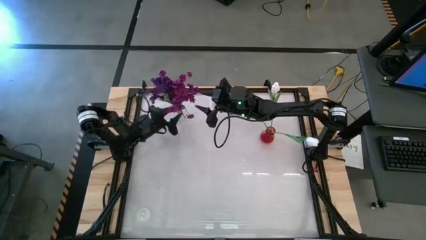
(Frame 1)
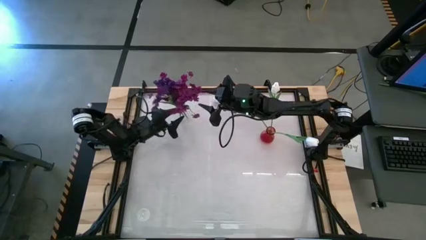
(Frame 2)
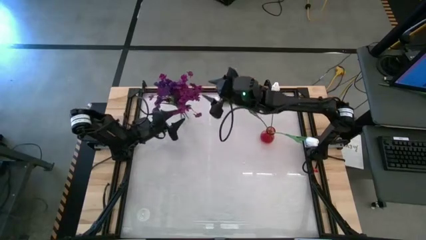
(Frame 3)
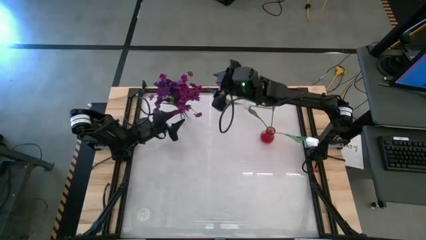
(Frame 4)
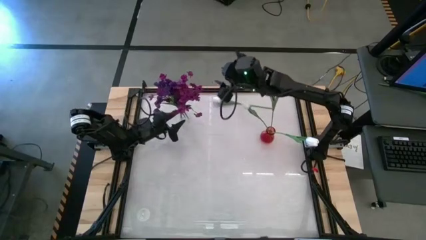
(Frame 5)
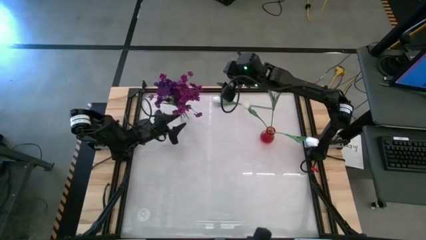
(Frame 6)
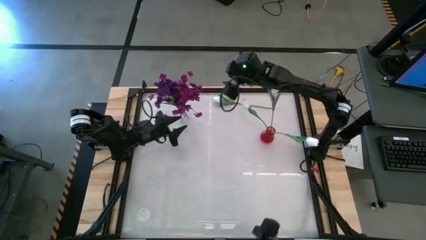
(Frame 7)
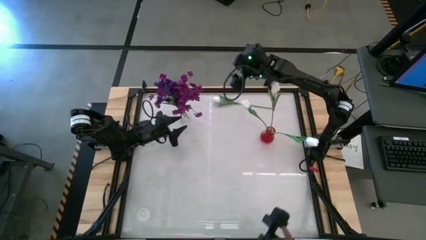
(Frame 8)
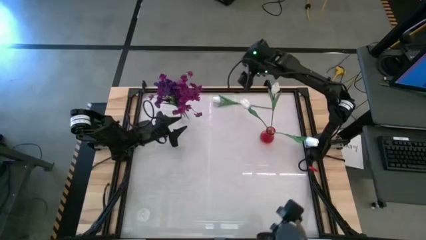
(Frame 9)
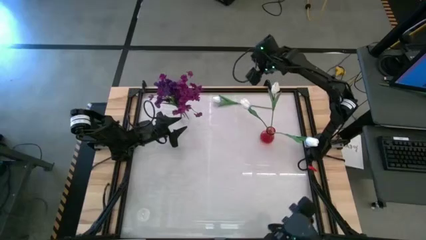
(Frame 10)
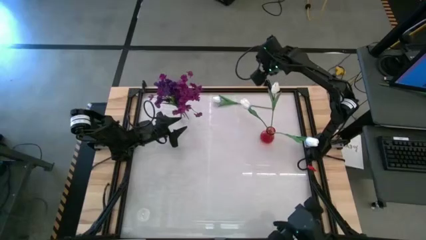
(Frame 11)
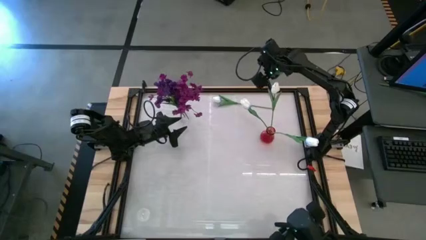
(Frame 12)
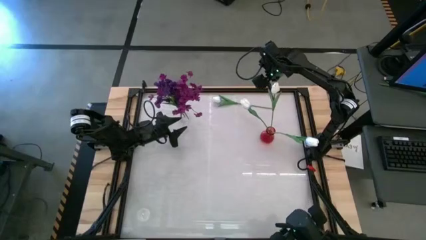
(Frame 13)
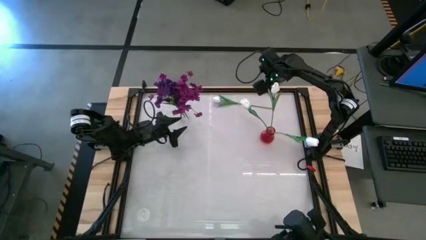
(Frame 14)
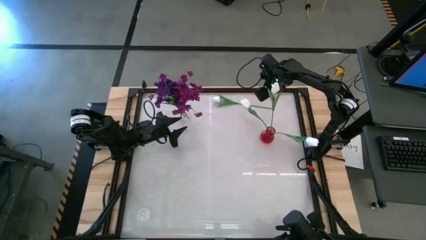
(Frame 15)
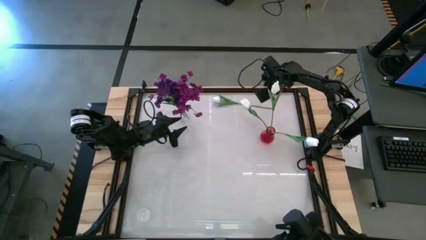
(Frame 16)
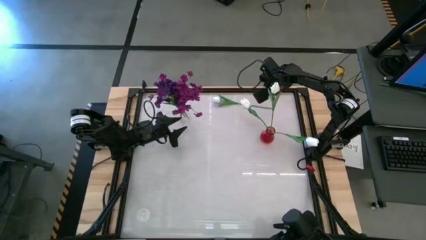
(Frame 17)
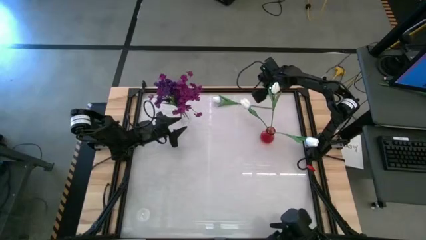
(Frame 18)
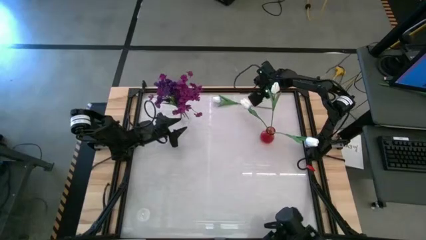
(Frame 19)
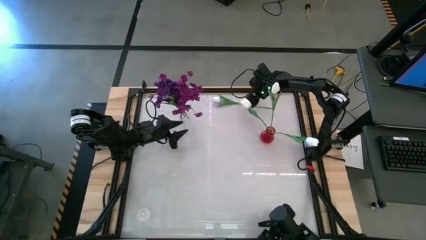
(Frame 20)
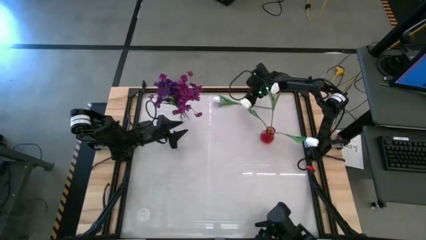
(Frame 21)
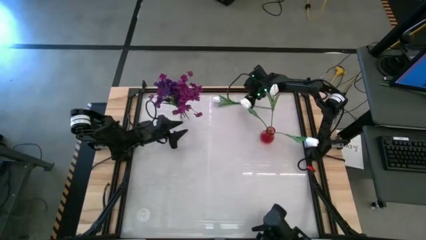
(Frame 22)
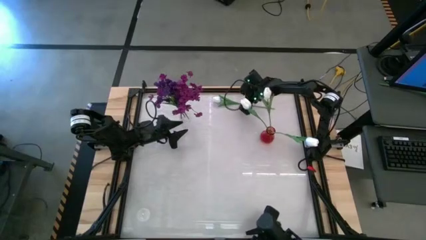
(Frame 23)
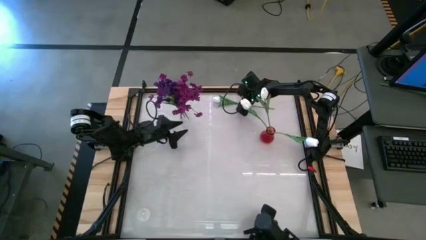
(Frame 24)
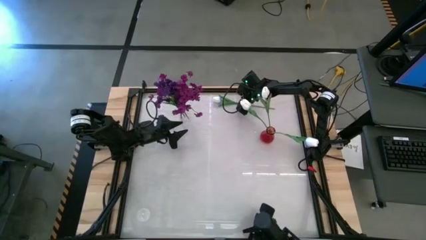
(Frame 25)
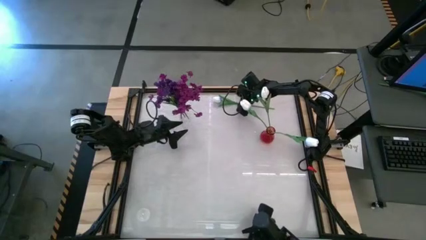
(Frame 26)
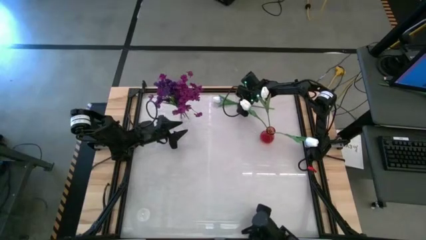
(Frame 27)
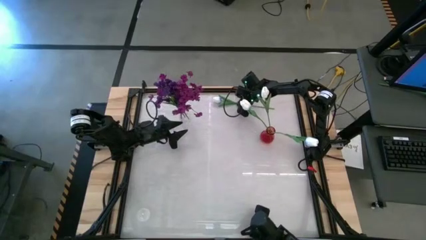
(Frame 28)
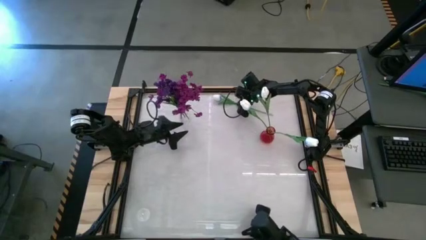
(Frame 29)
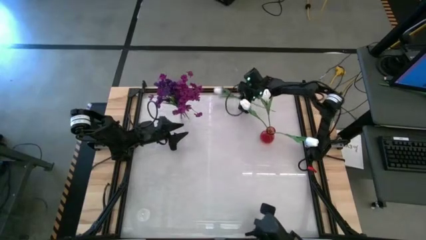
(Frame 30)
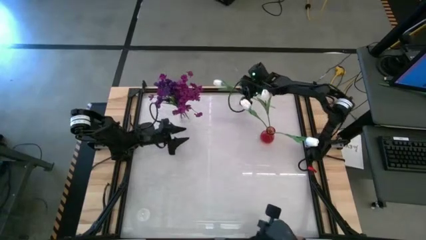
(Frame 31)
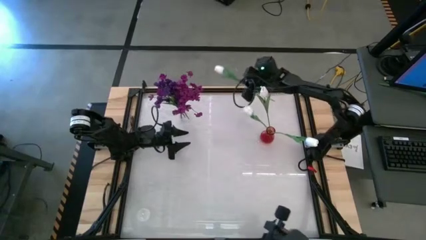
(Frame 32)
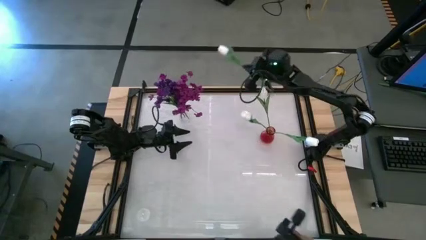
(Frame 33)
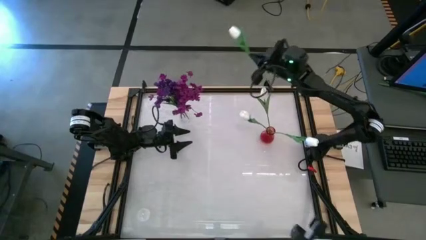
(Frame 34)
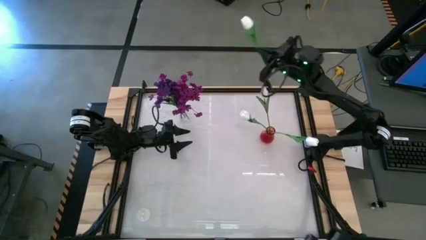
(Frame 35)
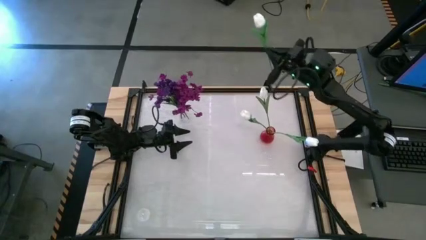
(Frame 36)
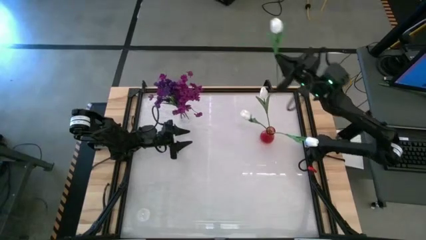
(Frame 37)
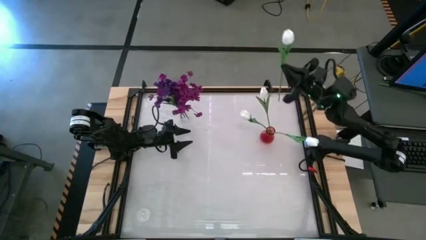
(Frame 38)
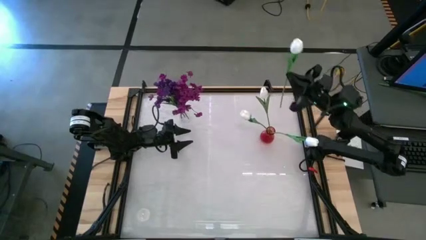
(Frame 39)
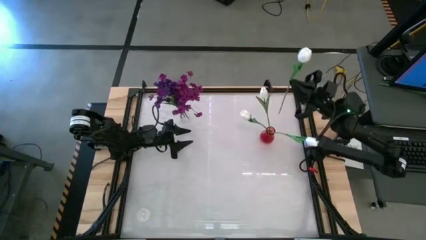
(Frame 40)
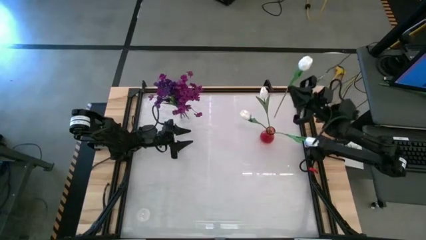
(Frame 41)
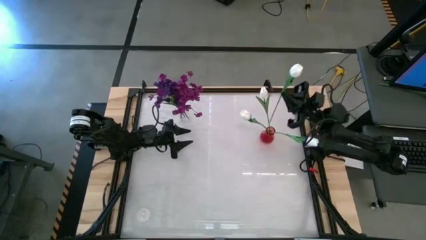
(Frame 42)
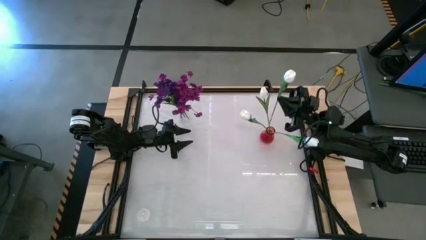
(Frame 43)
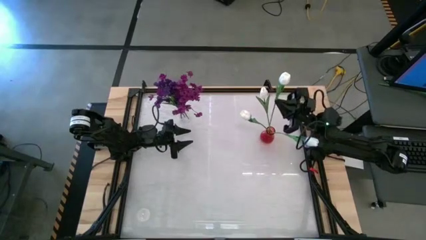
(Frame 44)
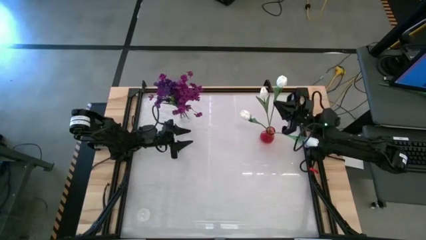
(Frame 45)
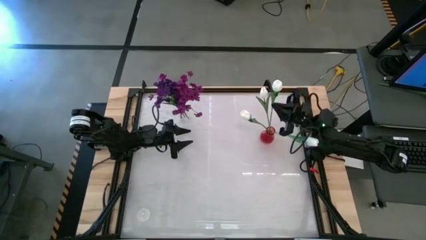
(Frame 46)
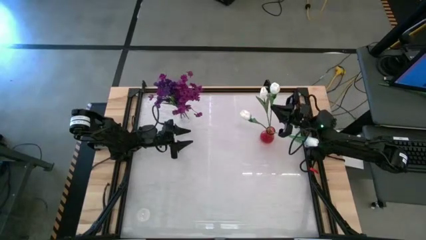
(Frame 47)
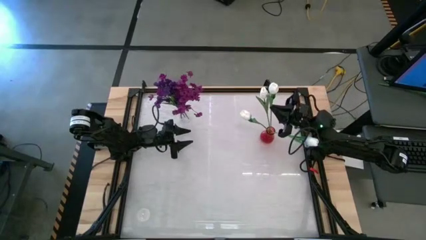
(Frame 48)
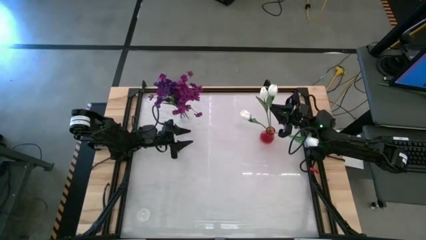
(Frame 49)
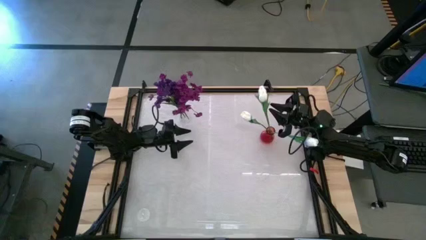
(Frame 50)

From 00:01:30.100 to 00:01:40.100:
Task: Sort flowers into vase by color
Put the white tulip into the red vase

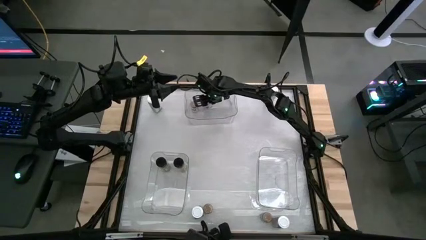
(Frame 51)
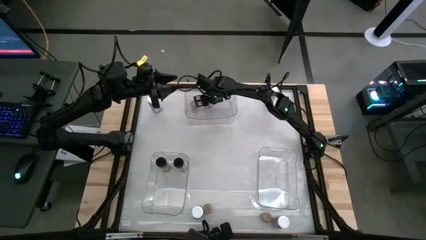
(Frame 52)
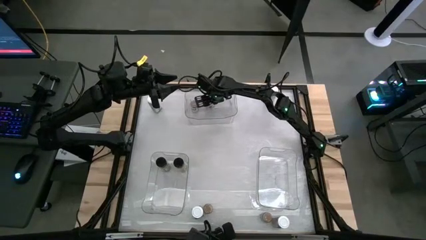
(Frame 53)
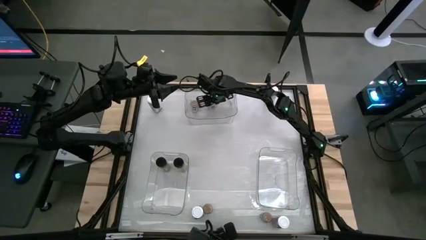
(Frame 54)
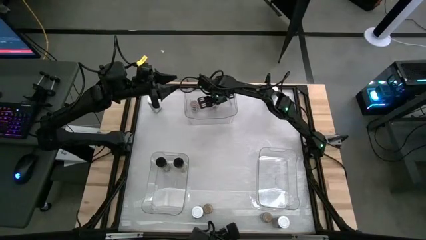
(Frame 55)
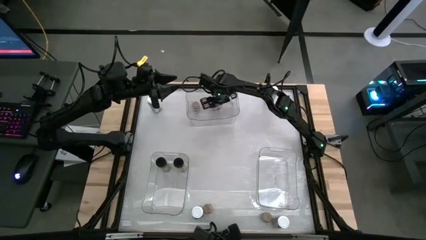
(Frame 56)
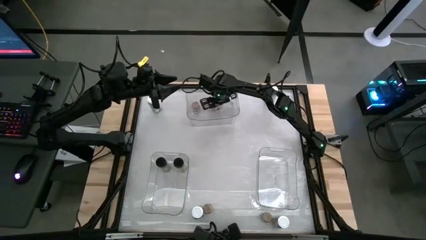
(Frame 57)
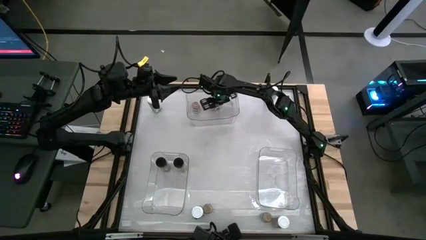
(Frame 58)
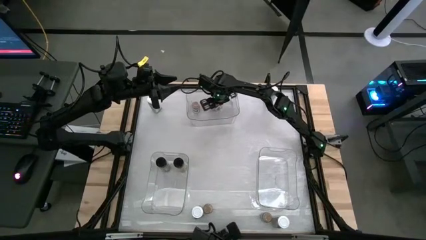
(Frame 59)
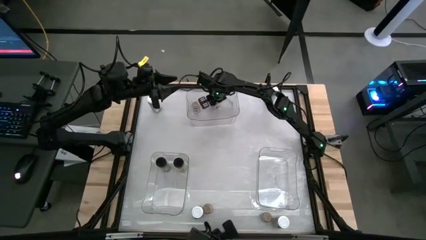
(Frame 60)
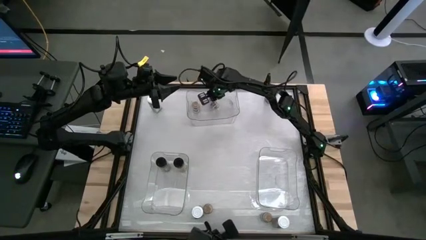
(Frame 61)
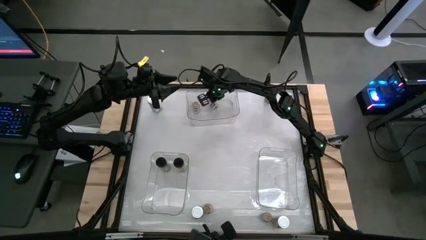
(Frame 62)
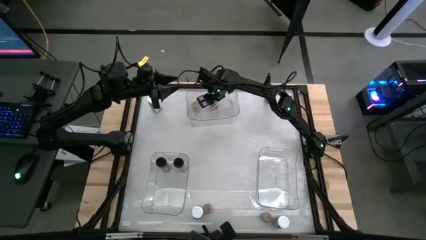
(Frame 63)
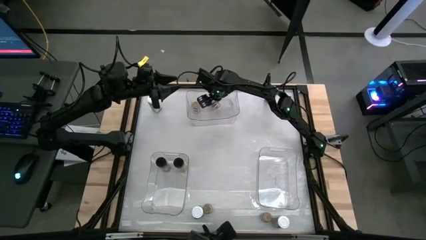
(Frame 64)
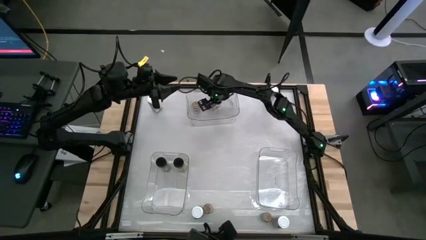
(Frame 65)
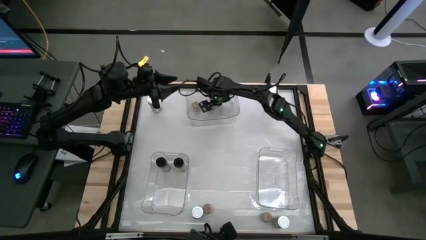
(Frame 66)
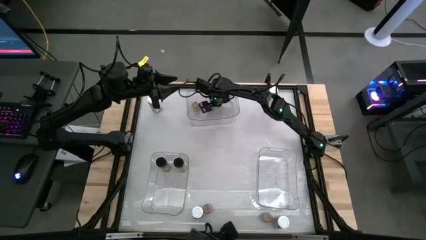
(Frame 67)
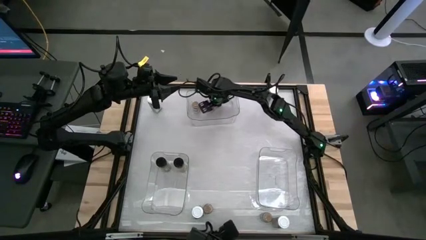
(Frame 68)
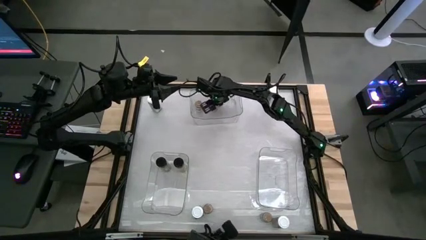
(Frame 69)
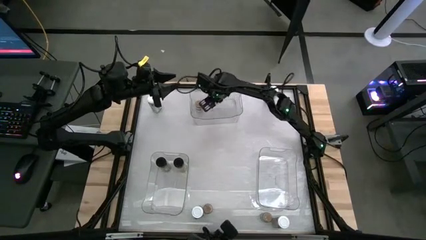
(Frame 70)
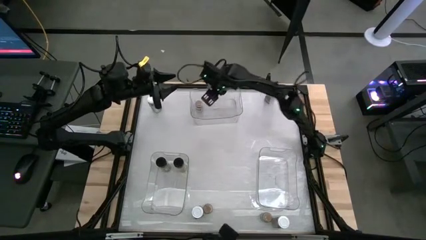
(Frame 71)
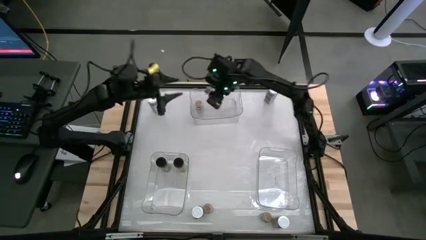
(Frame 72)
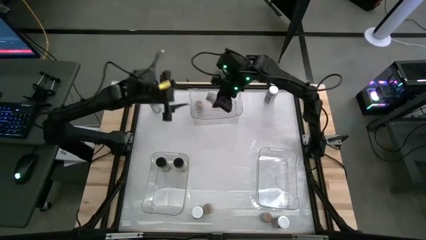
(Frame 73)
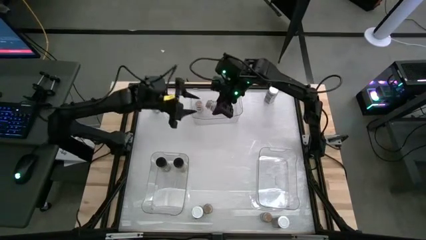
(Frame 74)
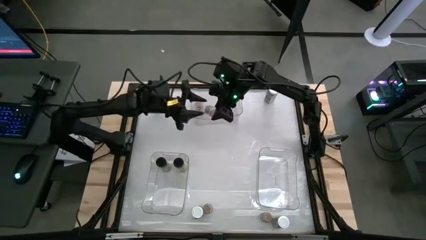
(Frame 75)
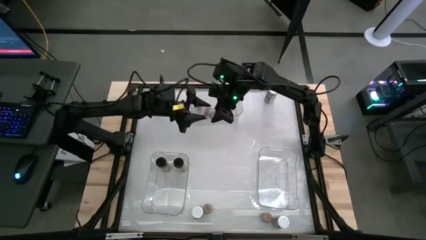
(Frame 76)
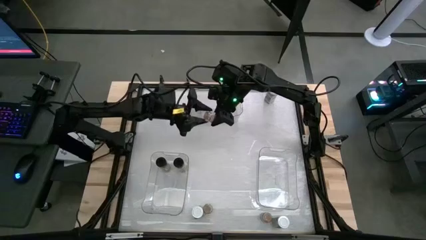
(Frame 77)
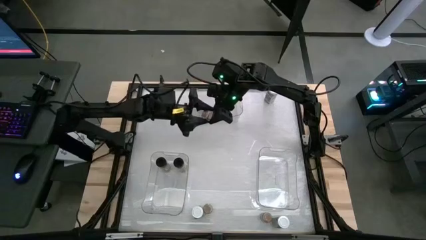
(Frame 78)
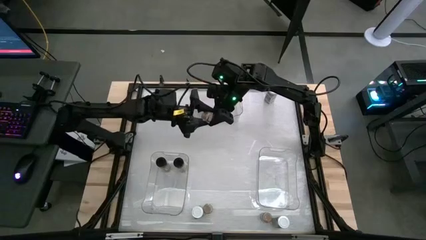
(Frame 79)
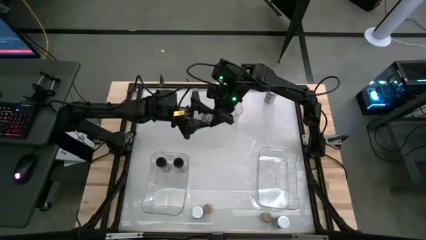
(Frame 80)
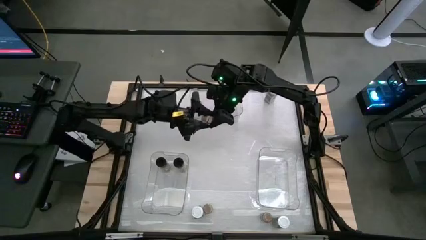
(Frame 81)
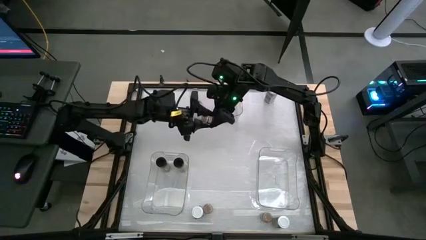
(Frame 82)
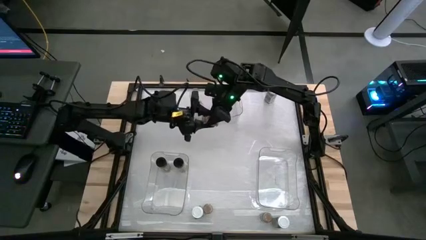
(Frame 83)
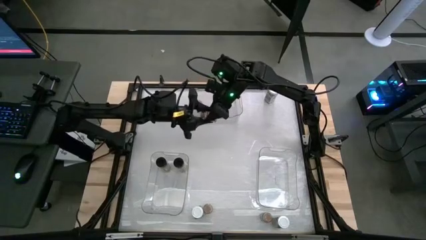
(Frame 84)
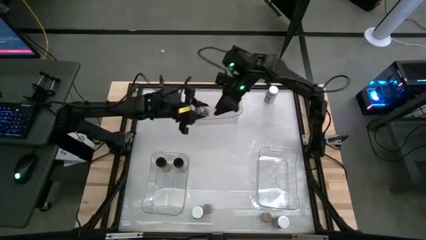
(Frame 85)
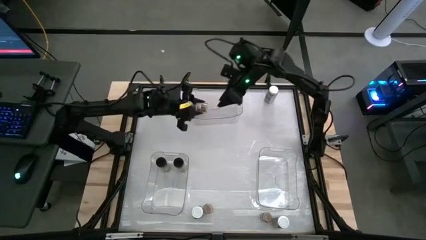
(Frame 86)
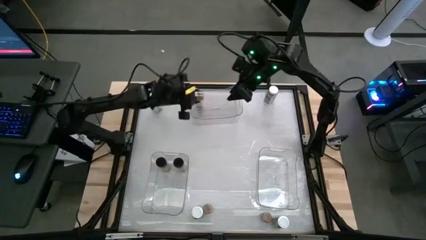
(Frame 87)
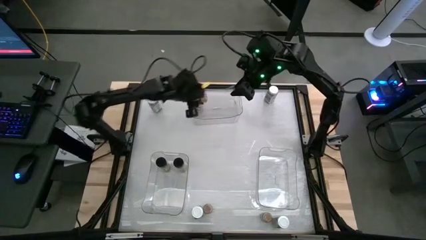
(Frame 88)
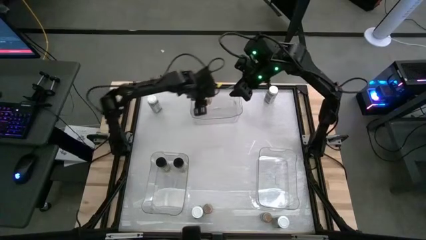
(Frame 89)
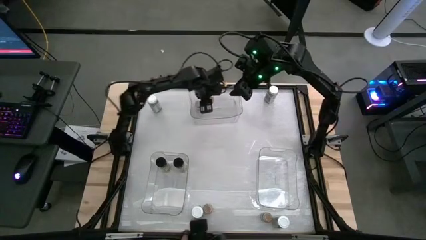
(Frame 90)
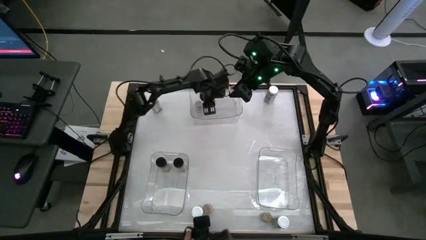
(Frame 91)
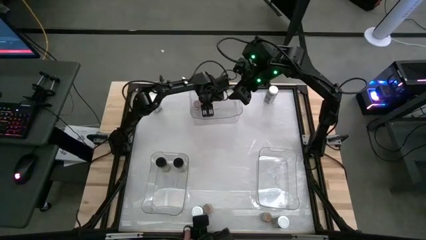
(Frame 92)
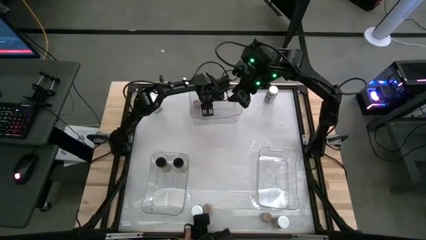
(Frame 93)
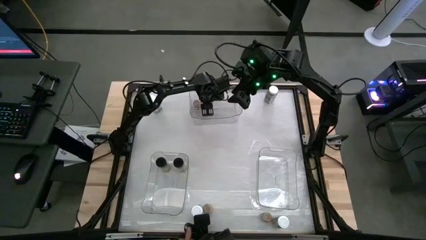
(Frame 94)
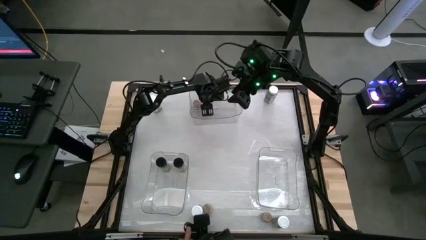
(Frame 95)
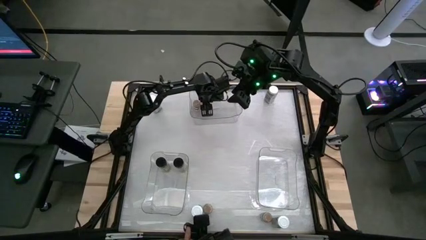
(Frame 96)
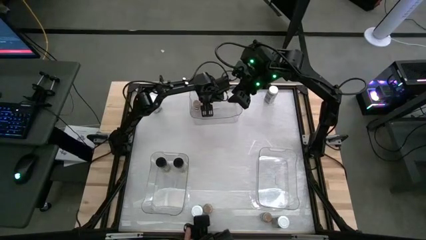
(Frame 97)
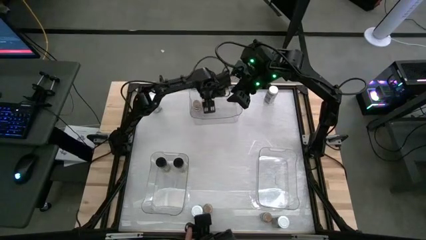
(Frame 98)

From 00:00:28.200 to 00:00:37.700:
Task: Sort spices by type
Put the brown seasoning bottle into the middle transparent bin
